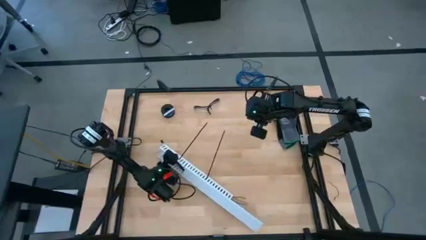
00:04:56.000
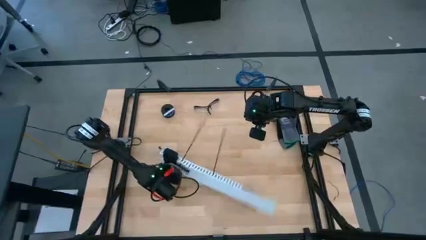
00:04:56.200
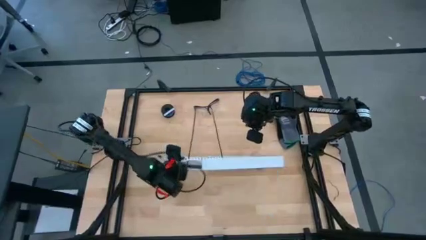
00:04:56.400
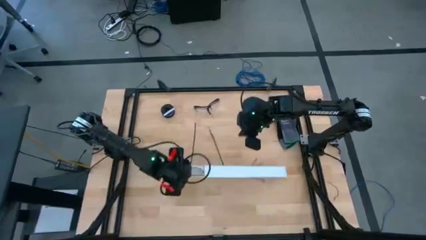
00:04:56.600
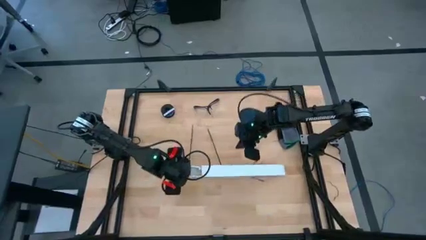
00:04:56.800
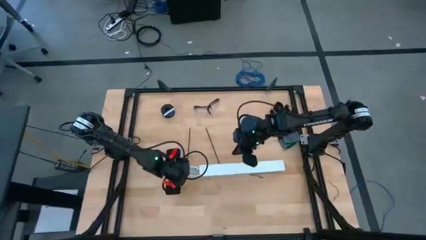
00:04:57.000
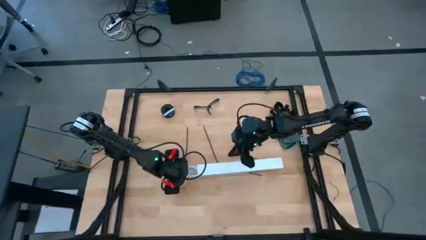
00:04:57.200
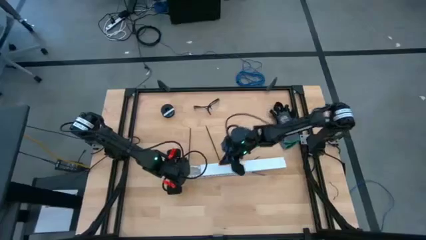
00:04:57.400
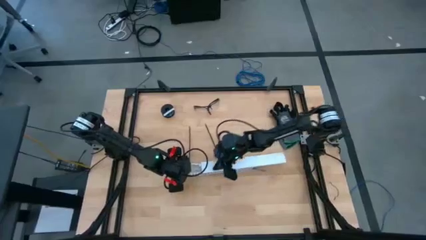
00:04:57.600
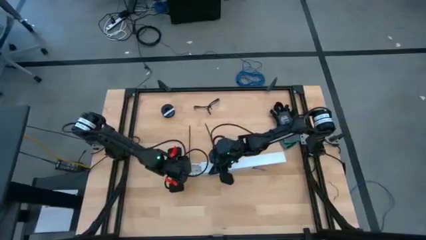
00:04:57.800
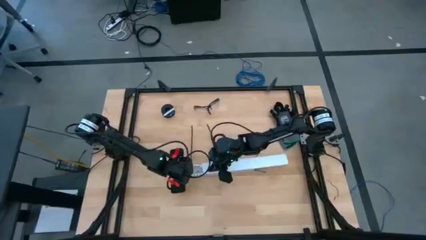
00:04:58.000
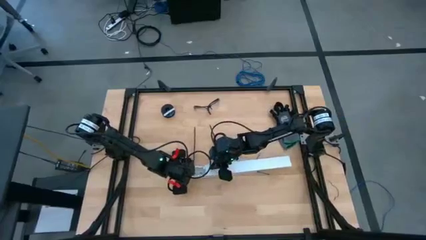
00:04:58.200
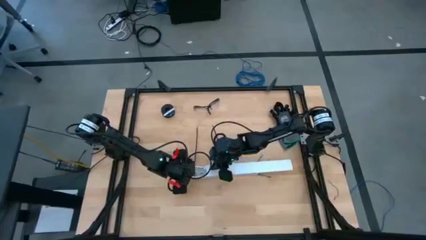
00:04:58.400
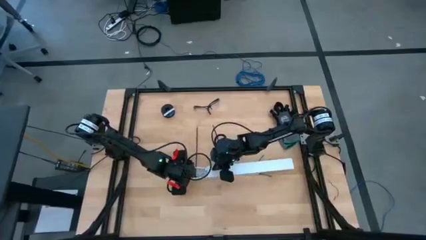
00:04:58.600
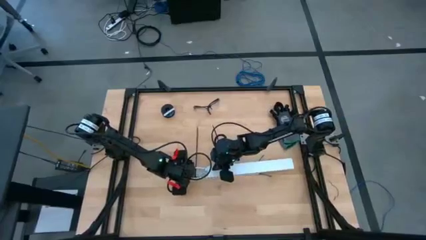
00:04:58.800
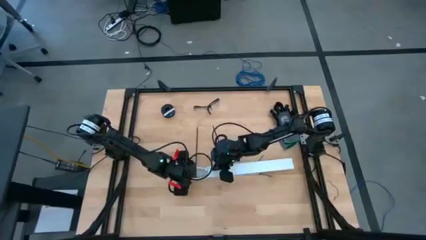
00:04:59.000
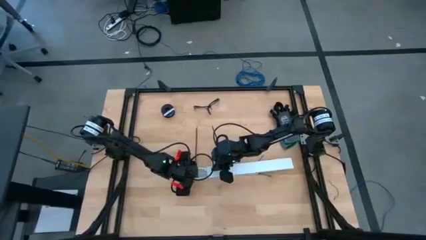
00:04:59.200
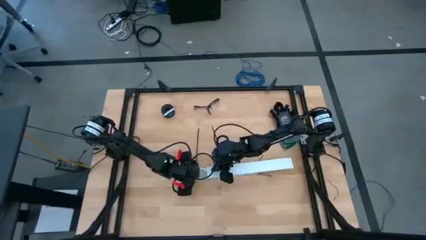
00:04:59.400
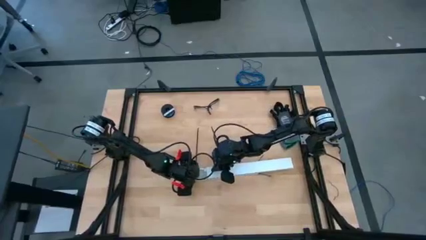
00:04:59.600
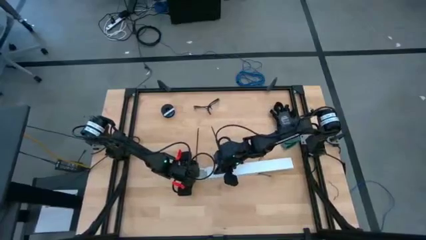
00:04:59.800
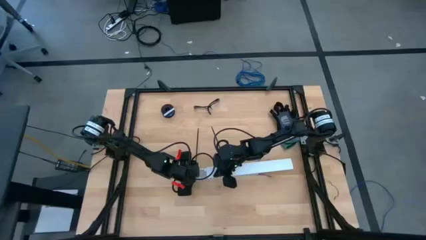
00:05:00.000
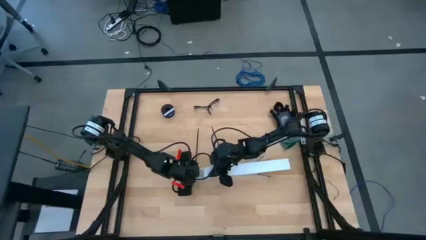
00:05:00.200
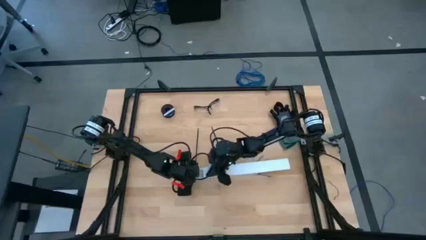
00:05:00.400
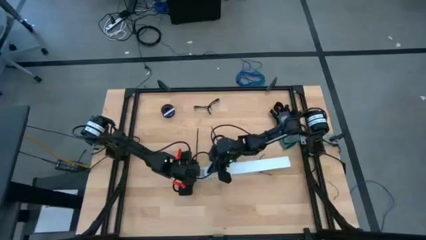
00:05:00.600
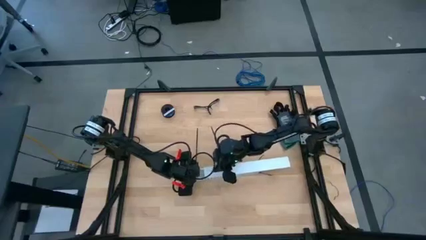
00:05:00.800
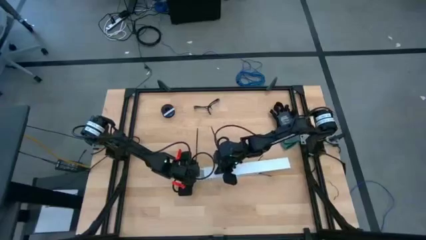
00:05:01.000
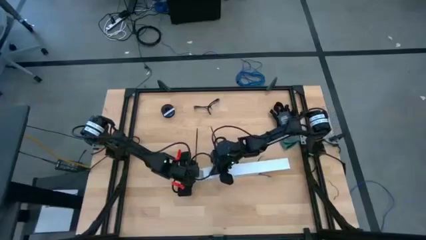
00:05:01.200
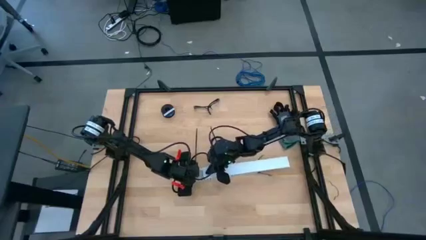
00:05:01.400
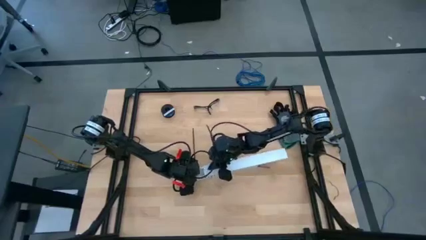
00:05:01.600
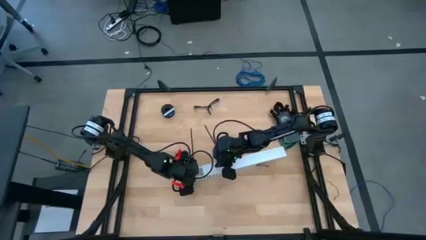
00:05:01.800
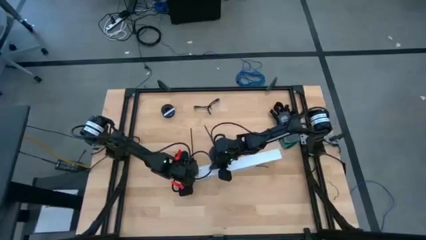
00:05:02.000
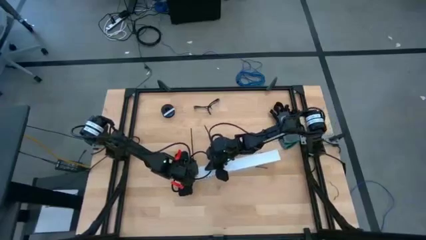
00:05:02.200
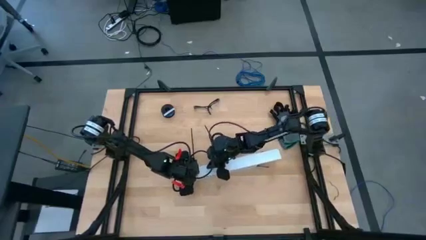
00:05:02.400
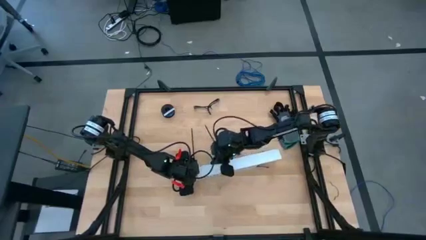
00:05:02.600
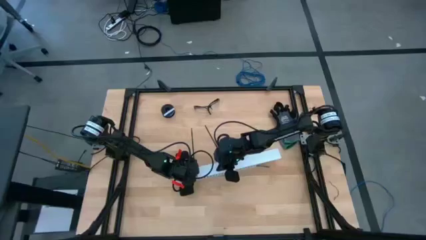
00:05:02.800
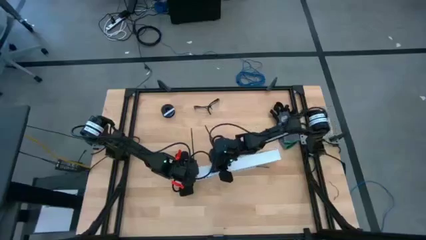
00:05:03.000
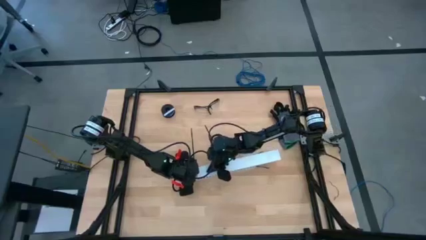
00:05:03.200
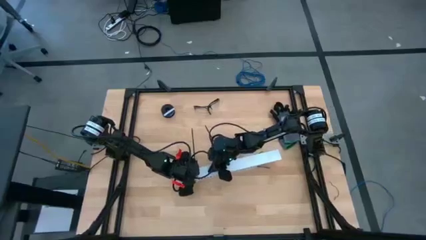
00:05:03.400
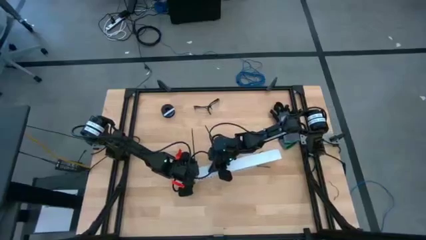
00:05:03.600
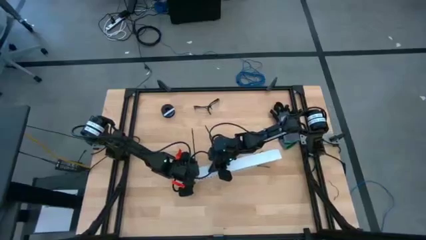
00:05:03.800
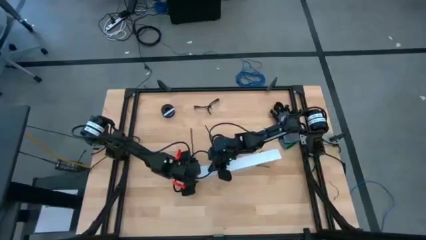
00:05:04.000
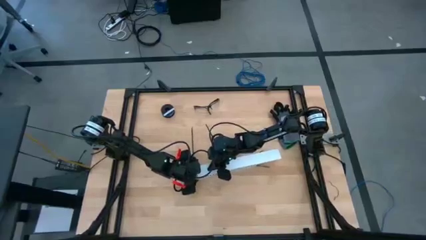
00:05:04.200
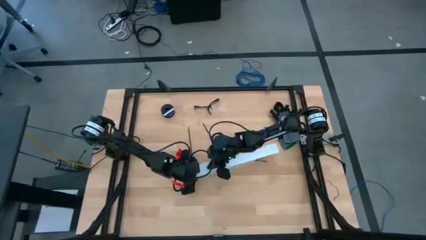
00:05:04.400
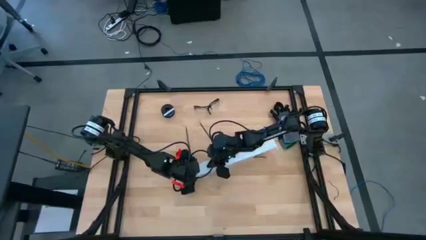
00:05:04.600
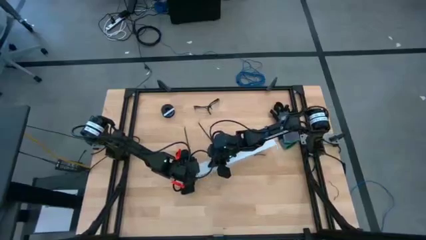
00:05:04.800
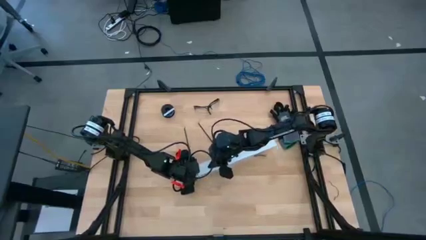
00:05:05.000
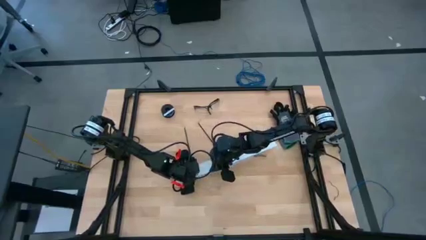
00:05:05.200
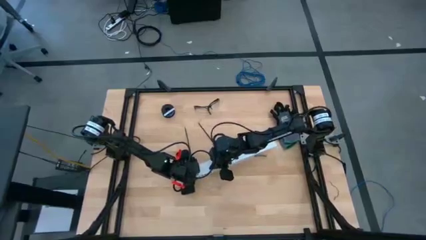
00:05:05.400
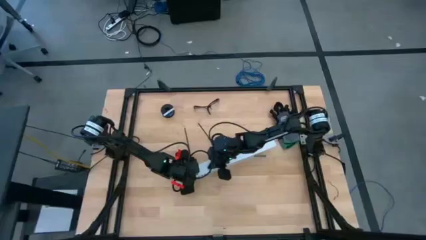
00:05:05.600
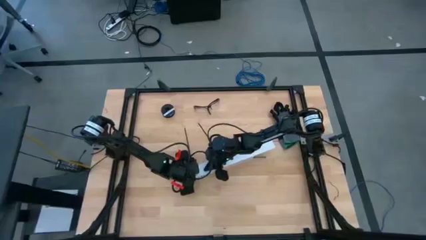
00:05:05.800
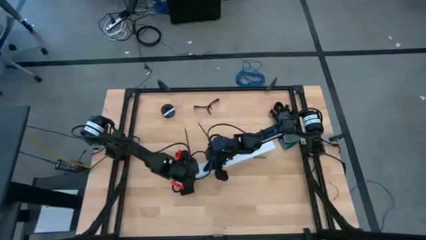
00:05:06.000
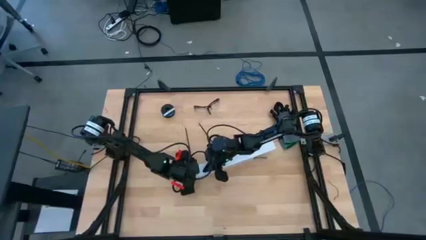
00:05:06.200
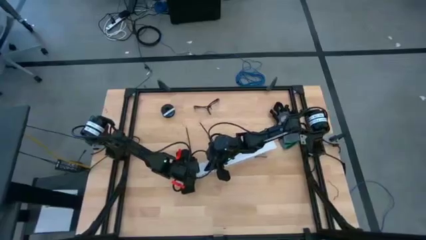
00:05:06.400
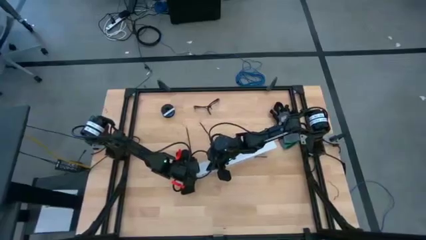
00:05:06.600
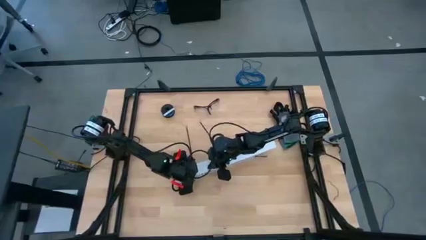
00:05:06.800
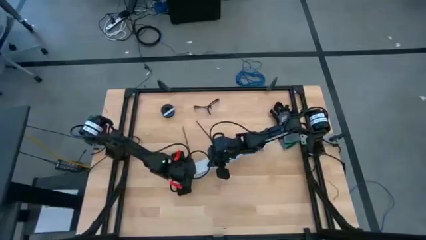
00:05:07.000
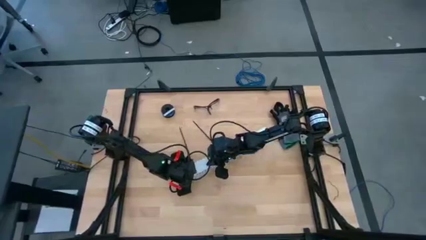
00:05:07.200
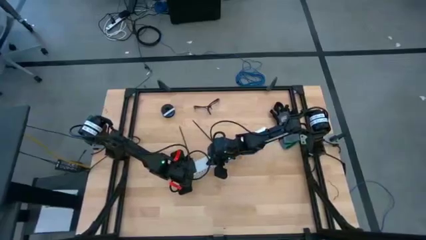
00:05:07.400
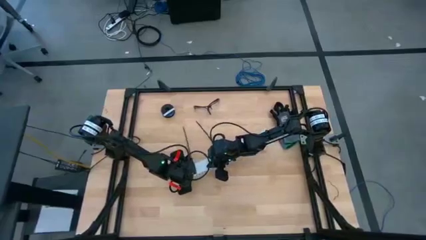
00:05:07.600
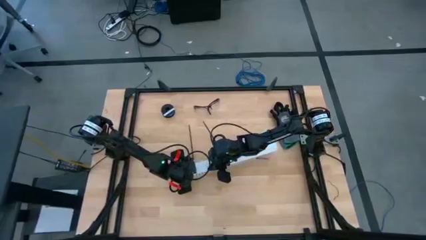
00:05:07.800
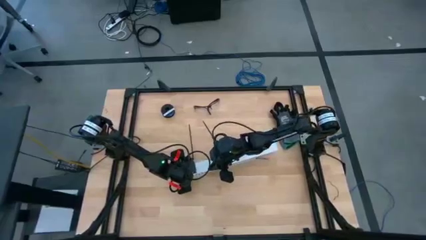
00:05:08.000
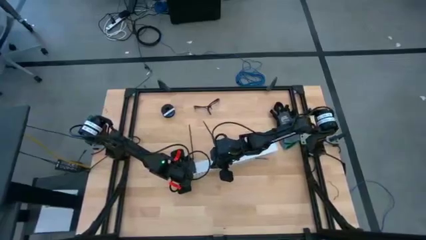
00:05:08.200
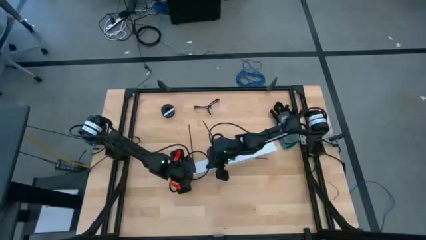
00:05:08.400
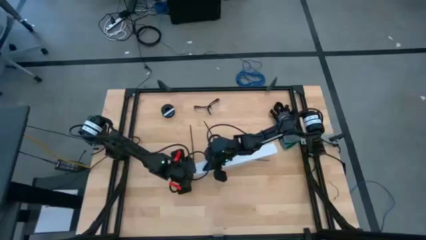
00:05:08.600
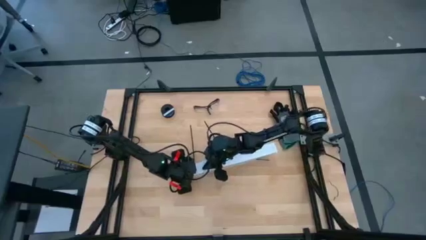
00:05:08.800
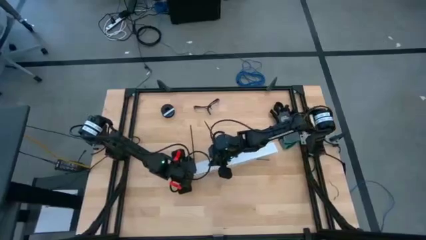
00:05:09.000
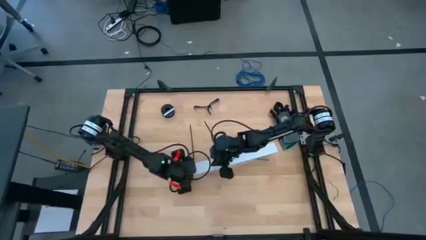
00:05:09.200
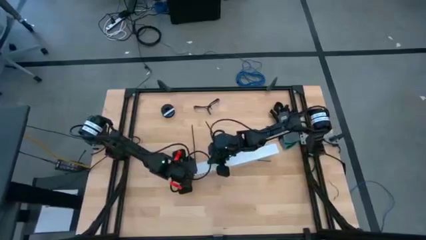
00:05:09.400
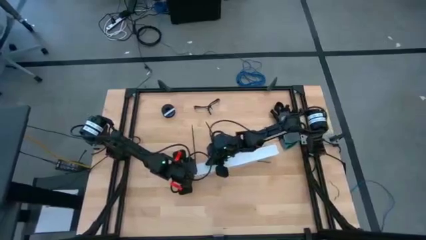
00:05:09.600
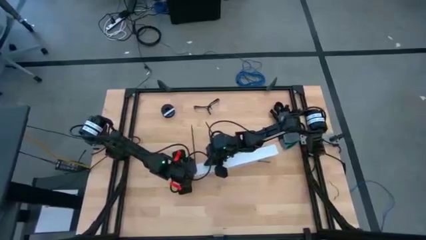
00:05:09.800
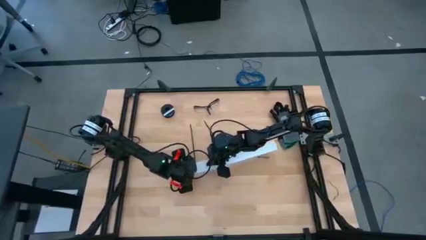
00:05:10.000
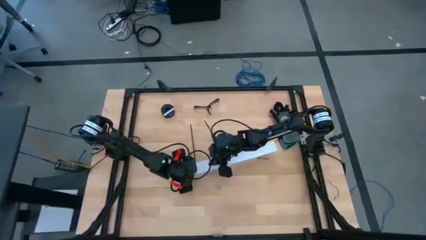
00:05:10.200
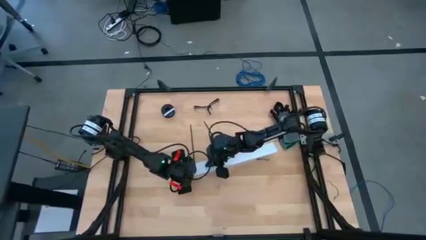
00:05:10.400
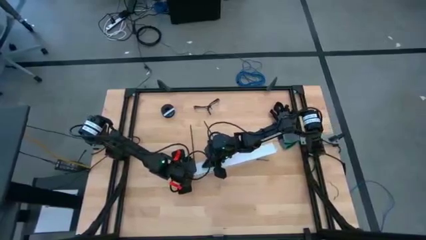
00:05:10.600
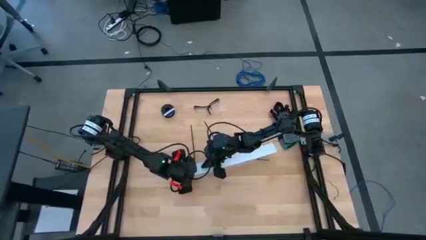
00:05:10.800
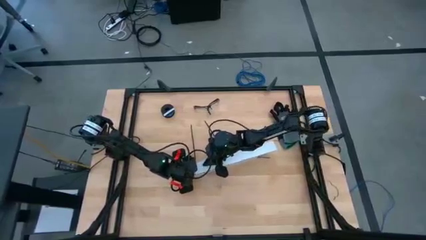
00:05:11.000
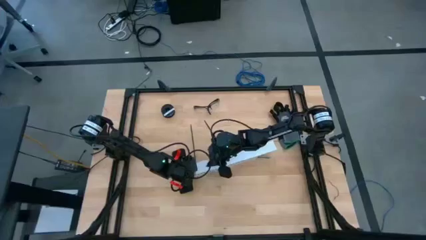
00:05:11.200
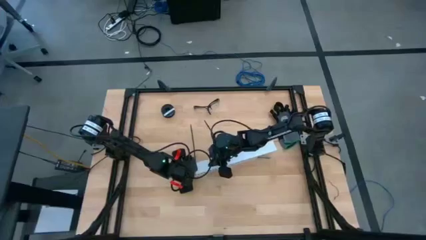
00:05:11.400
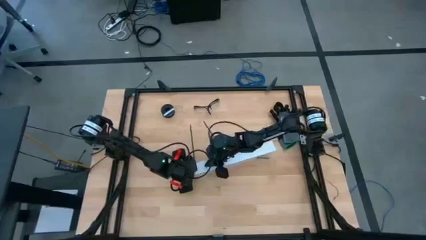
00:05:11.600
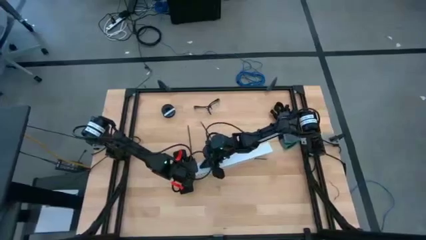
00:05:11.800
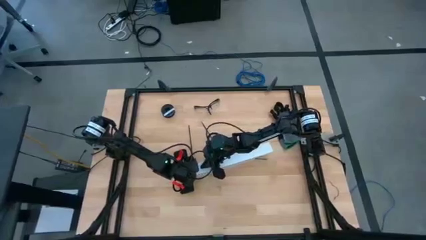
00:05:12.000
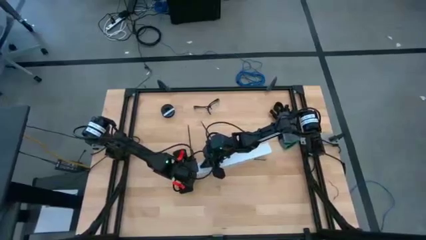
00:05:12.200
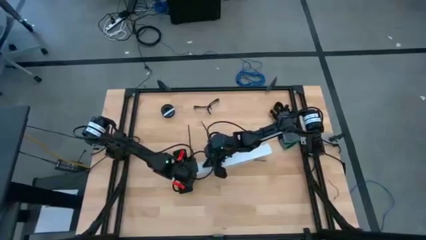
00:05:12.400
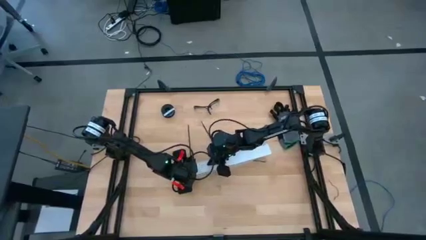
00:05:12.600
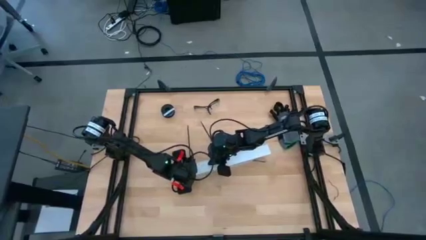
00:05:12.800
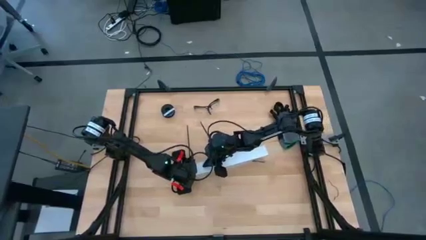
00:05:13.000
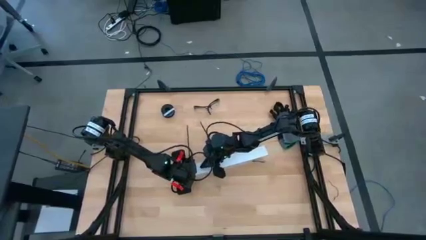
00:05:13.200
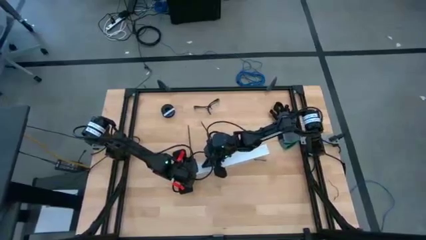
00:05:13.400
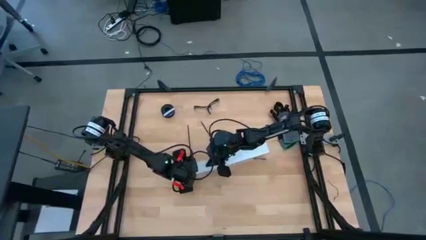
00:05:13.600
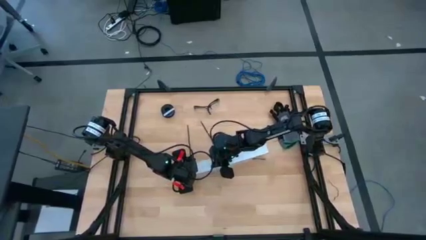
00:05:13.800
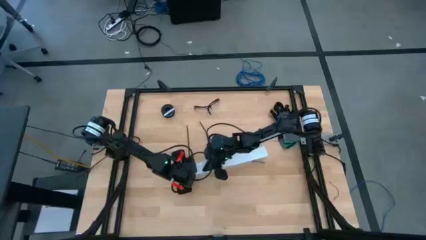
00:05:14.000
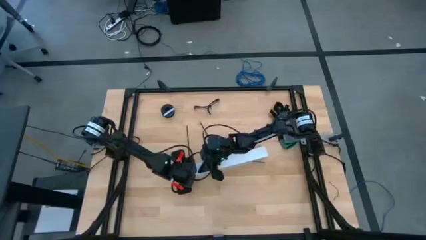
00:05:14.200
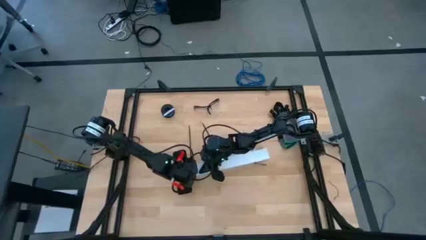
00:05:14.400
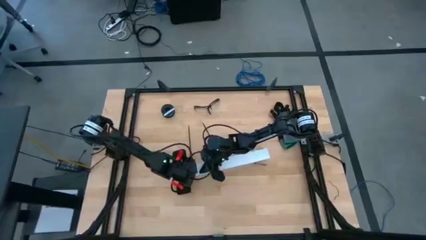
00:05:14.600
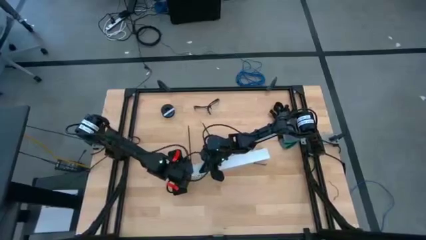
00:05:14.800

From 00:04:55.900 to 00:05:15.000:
Task: Ziptie cables
Close the white cable duct
